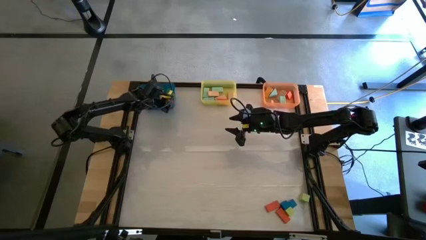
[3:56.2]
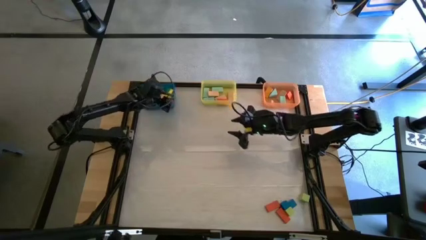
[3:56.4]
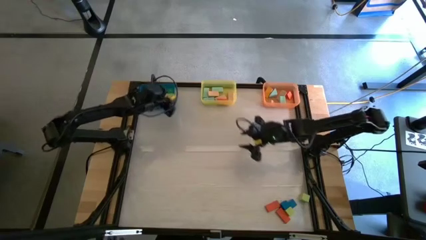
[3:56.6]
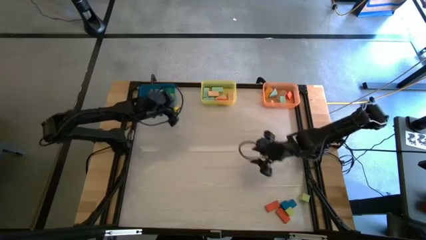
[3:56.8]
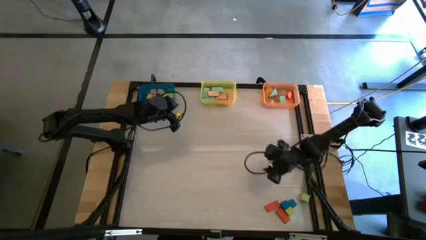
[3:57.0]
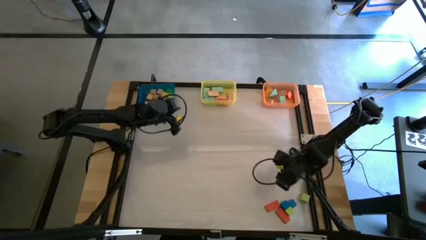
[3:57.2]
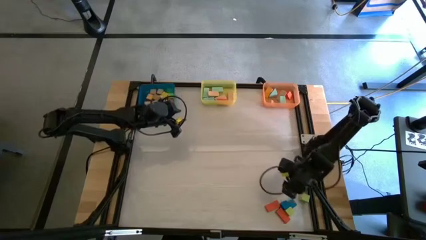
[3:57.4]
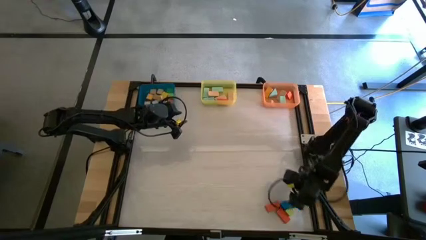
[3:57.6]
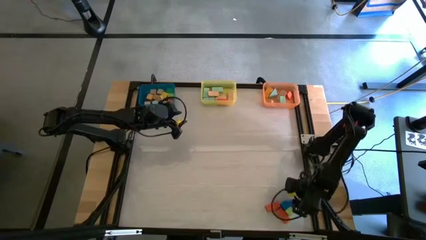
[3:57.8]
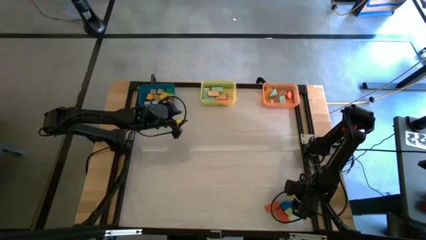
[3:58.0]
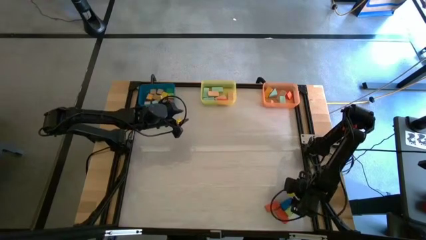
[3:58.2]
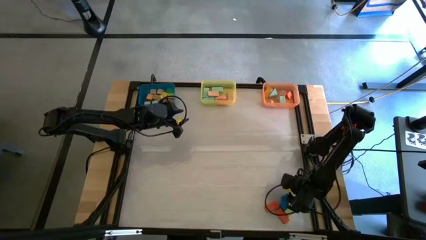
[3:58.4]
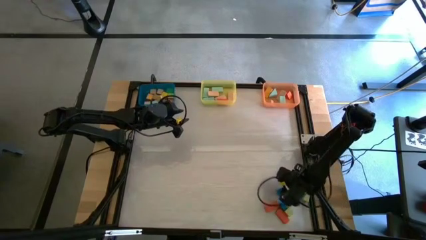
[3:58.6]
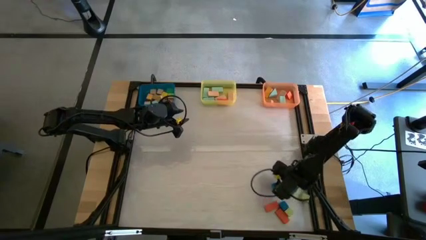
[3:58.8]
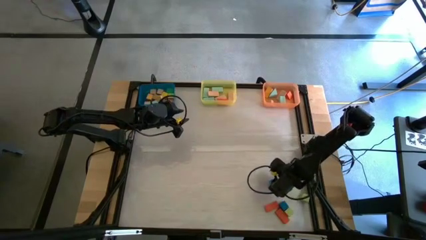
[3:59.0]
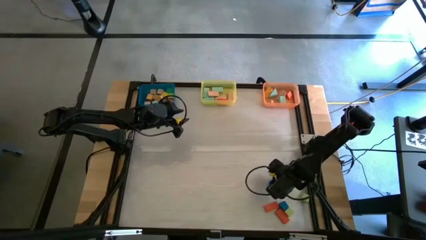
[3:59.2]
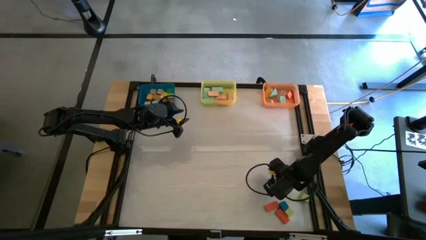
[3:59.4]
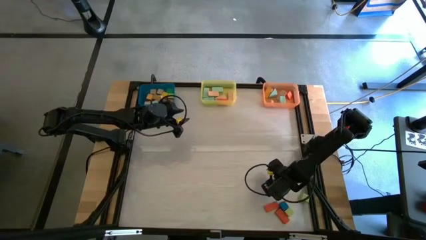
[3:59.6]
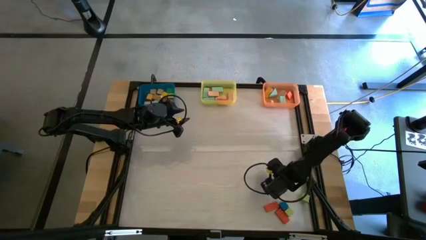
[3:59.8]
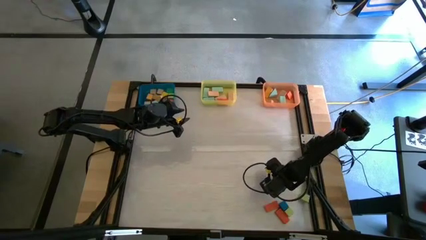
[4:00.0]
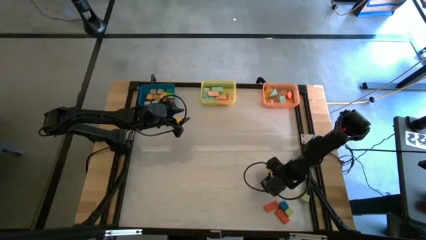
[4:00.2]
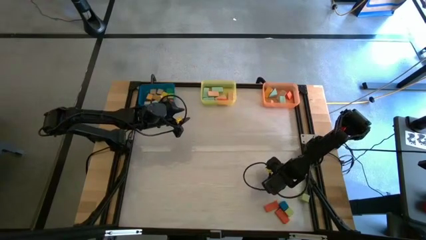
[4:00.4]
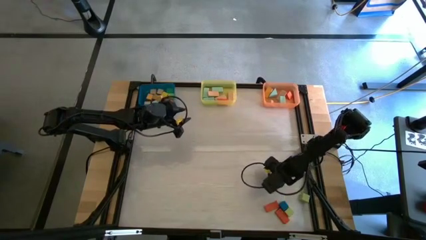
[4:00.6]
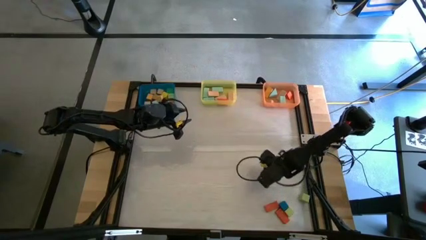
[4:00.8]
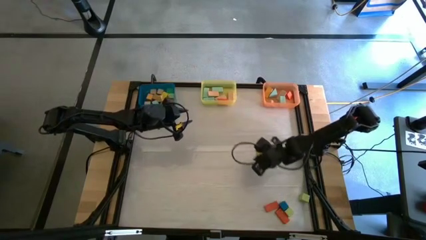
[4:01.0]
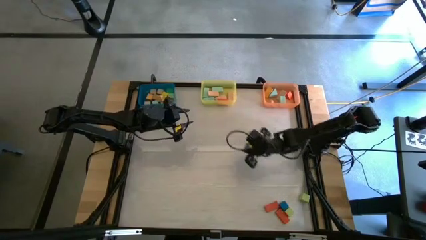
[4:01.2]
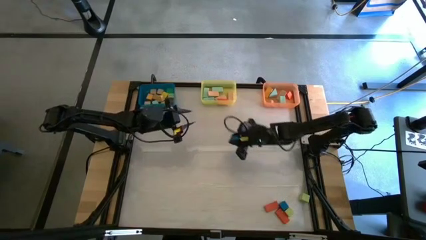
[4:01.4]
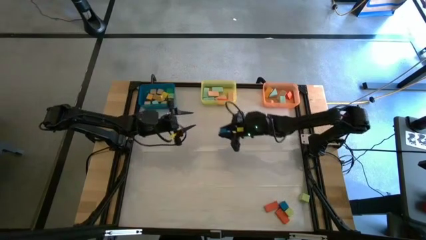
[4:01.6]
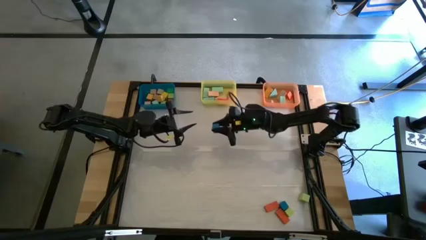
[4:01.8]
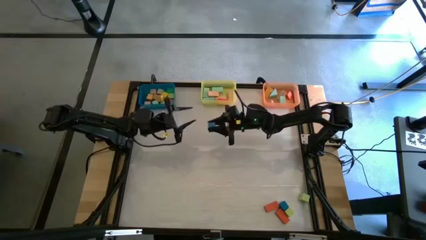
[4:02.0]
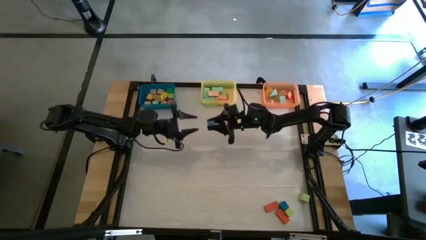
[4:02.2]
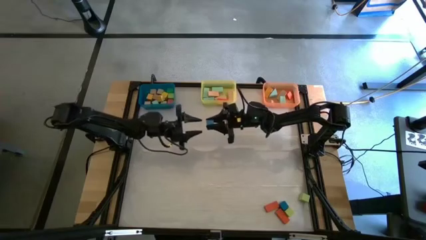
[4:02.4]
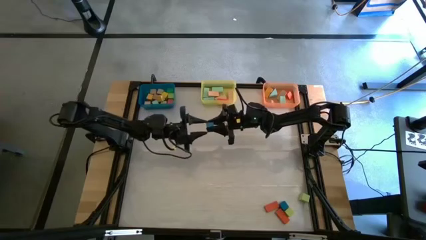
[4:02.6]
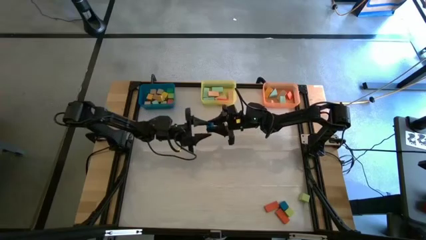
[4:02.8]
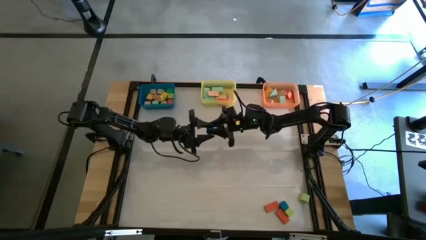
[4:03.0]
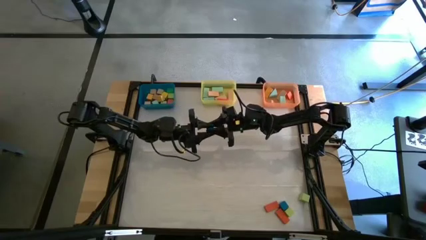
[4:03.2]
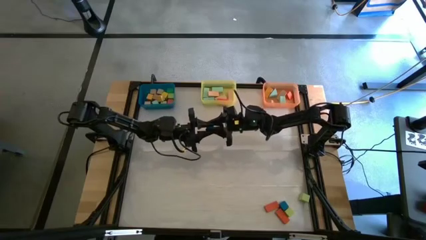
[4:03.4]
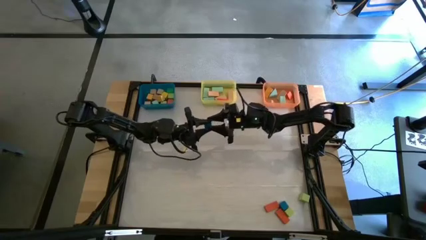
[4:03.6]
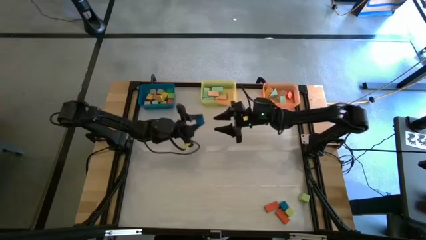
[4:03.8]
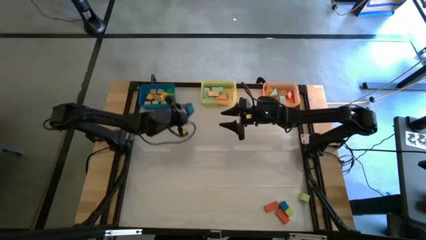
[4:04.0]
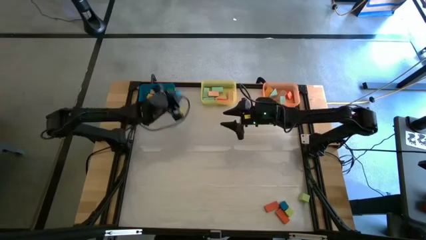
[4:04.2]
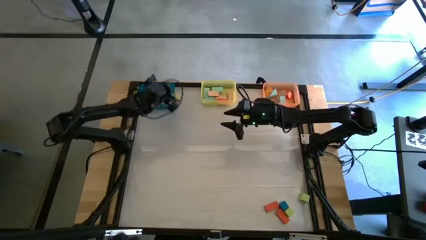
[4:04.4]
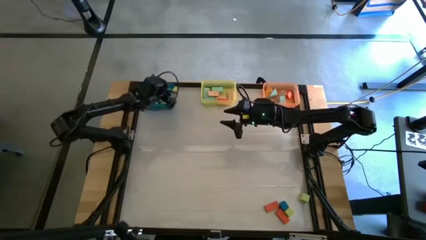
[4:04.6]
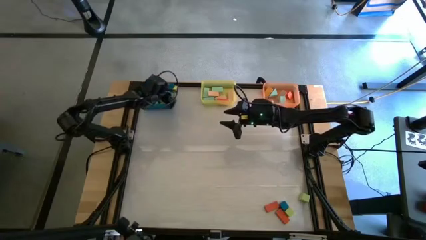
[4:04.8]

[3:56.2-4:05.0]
Task: Sort blocks by size
Put the blue square block into the blue bin

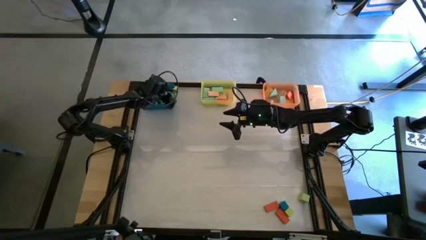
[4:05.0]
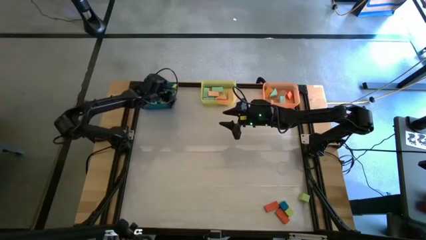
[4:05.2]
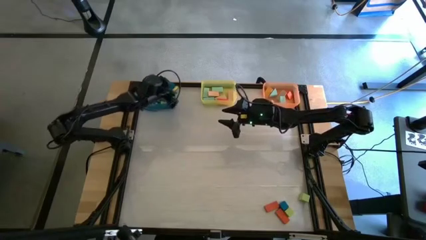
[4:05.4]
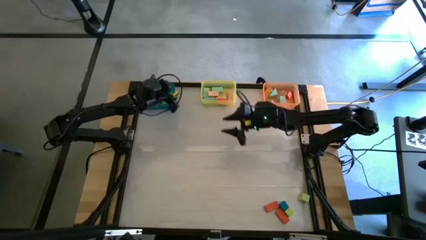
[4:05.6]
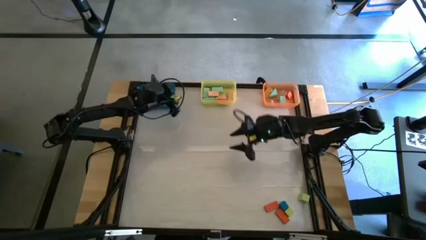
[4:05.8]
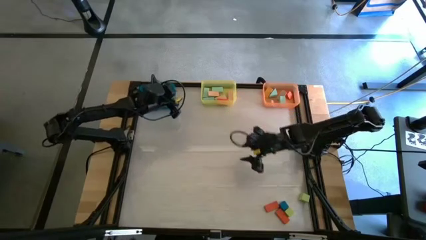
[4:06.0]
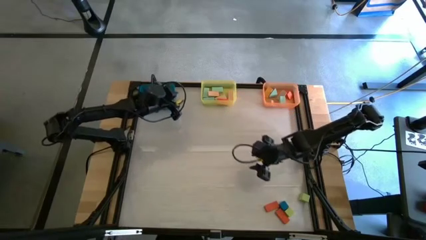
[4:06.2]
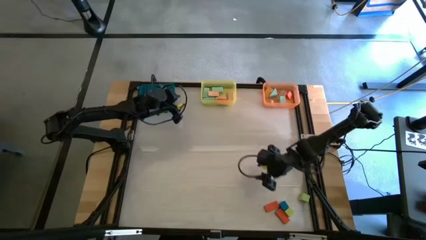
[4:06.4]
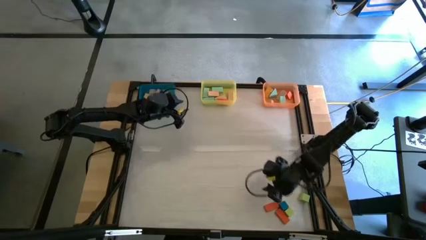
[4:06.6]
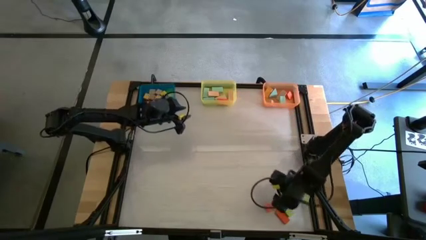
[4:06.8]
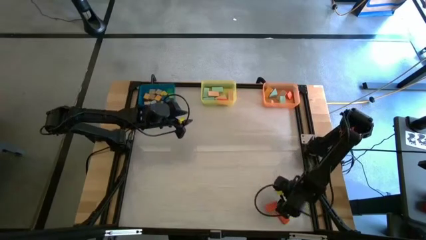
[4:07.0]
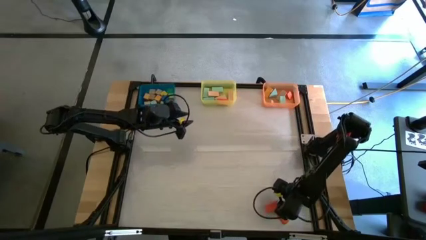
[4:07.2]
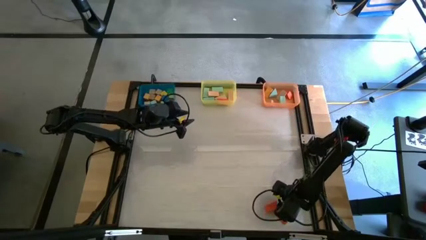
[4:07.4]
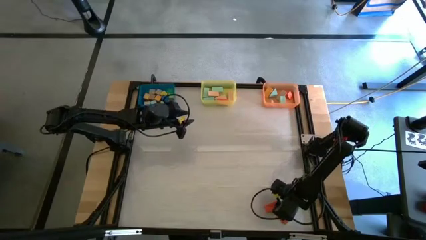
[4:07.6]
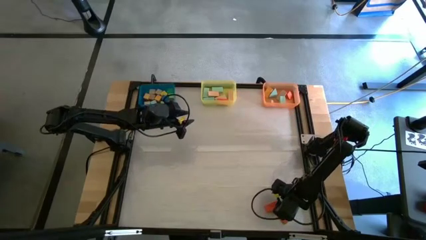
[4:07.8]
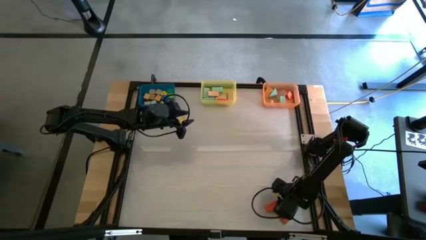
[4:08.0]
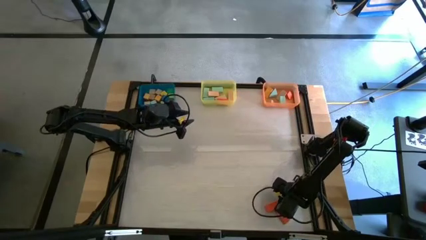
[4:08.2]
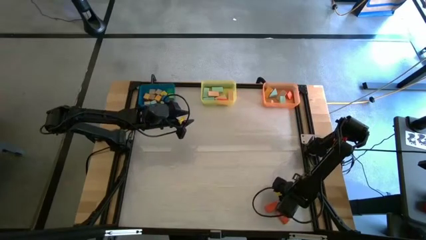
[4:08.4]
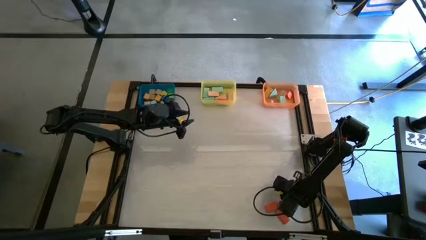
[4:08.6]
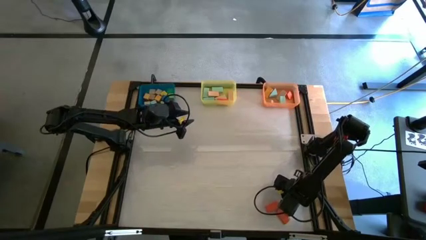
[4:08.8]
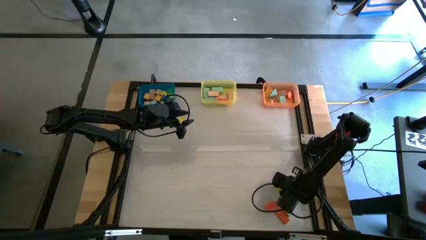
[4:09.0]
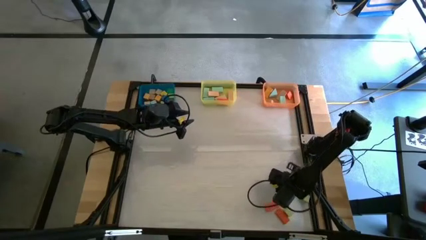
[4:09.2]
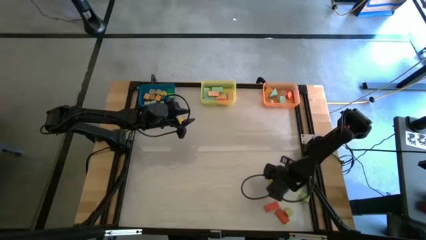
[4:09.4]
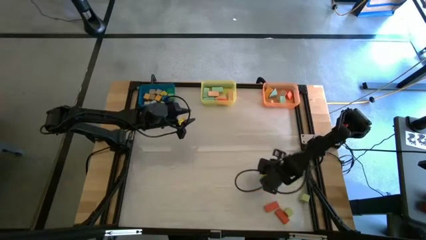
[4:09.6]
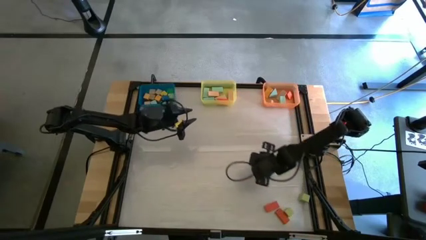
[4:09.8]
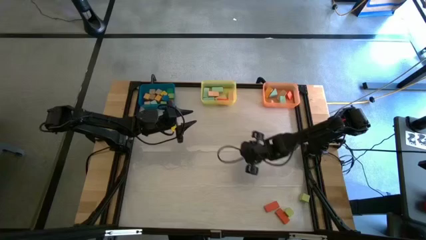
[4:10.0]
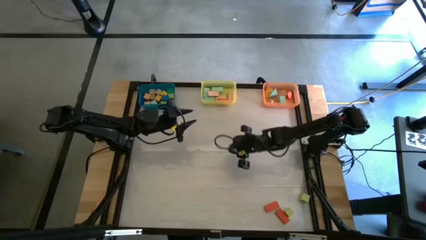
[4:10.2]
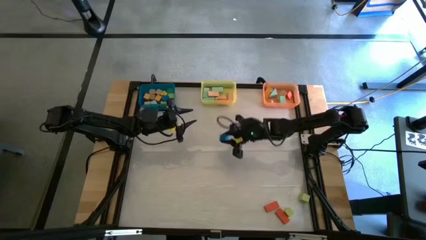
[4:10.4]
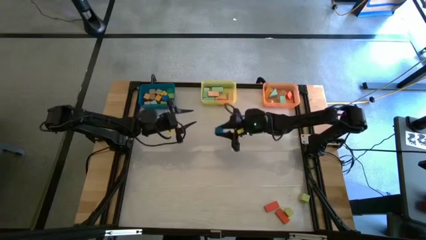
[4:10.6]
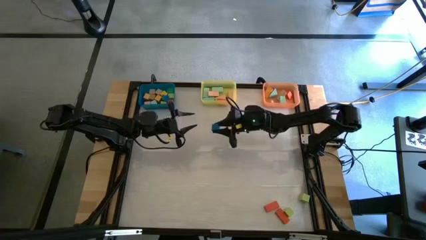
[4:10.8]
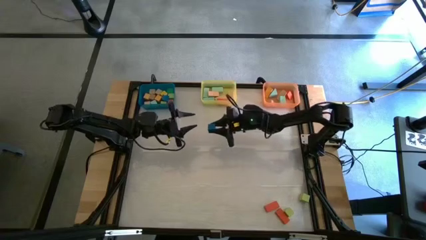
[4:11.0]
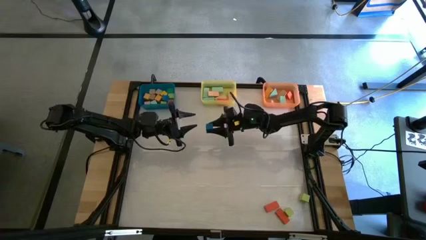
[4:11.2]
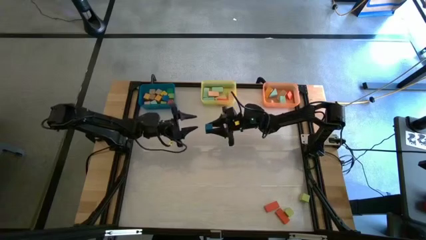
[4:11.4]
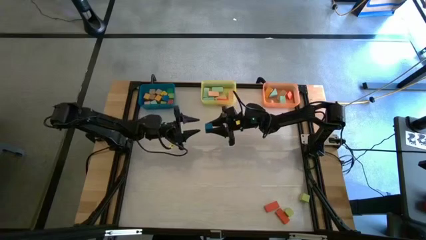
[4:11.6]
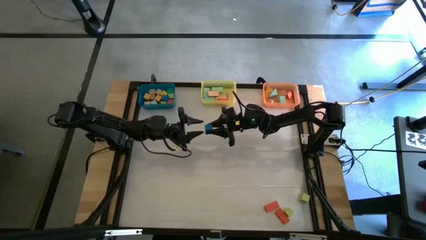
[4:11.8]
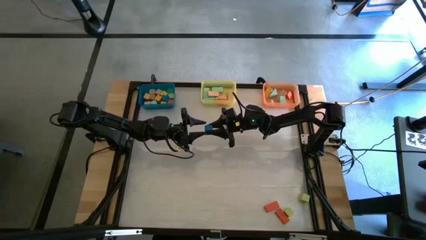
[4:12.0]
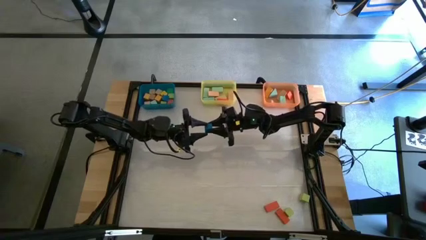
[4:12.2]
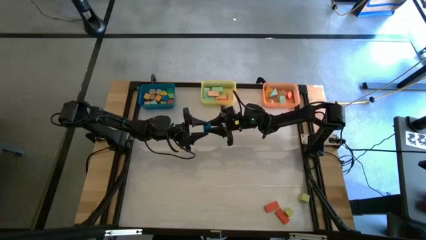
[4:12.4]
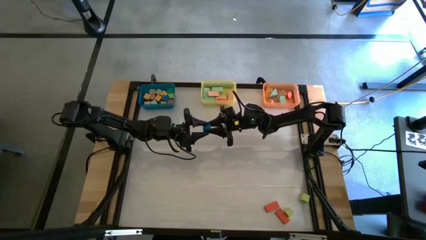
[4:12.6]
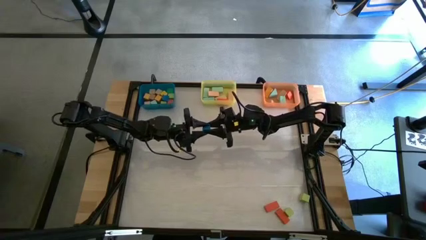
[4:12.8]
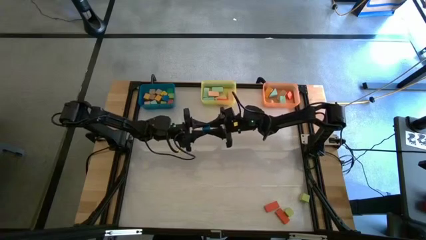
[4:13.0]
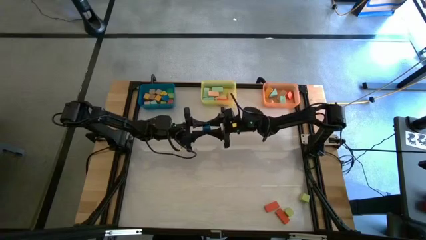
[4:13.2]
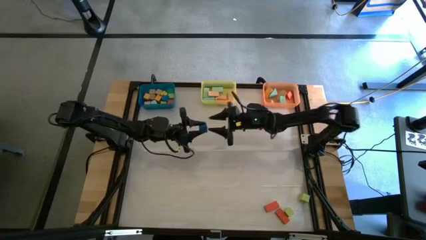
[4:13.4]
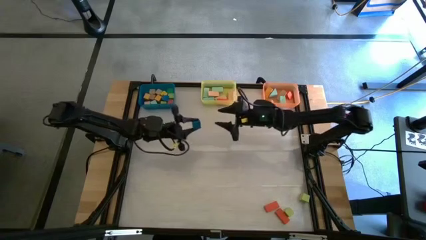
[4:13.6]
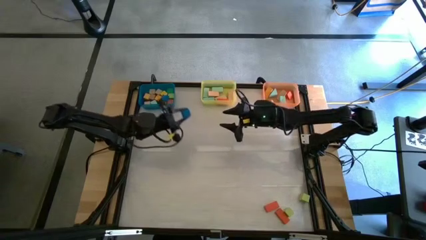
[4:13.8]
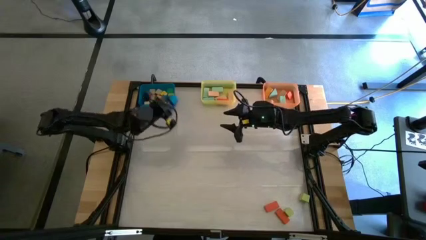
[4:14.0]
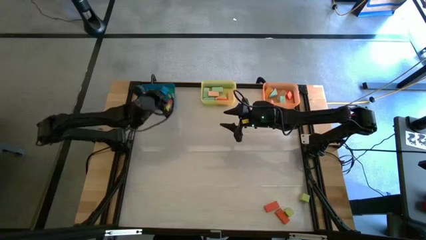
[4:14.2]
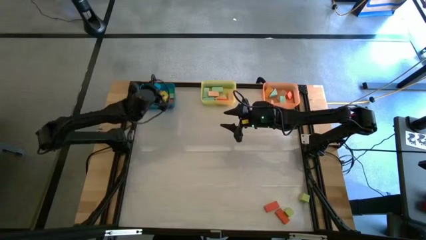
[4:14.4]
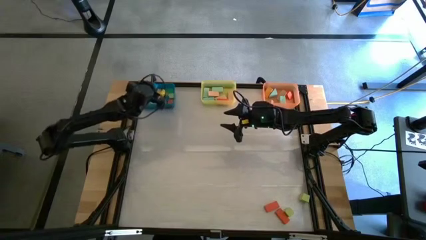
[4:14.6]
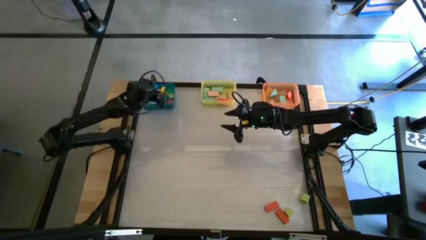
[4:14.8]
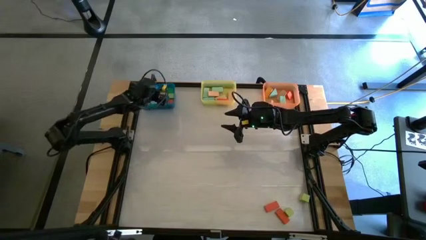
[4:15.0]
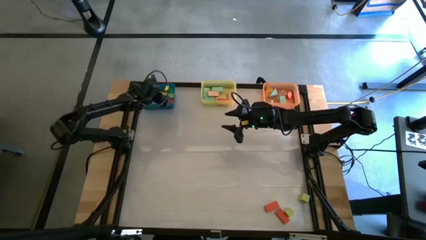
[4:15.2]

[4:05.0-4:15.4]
Put the blue square block into the blue bin
